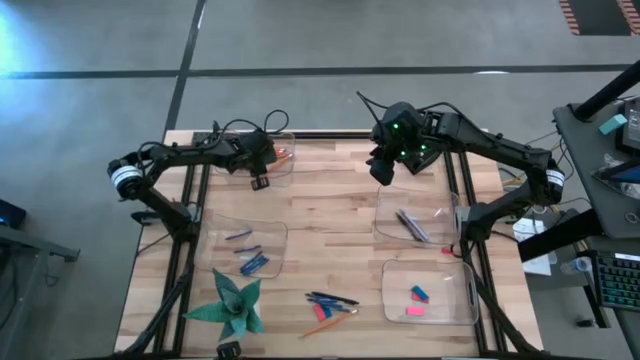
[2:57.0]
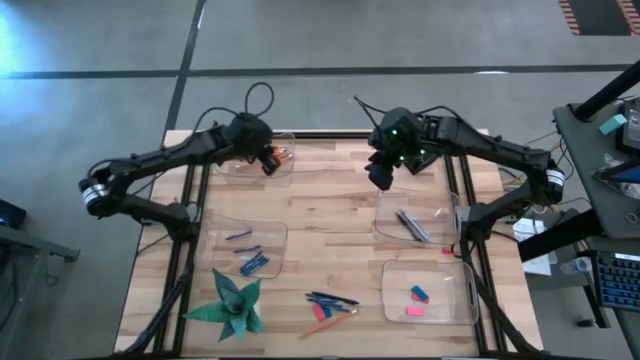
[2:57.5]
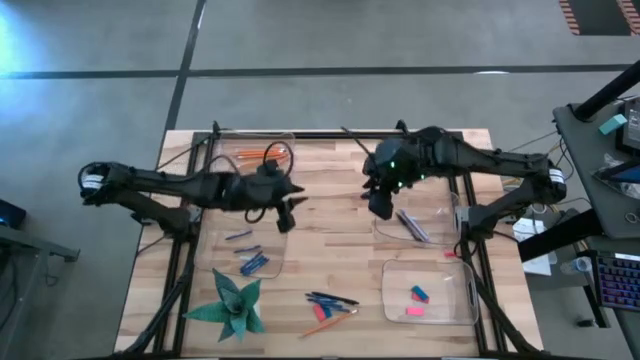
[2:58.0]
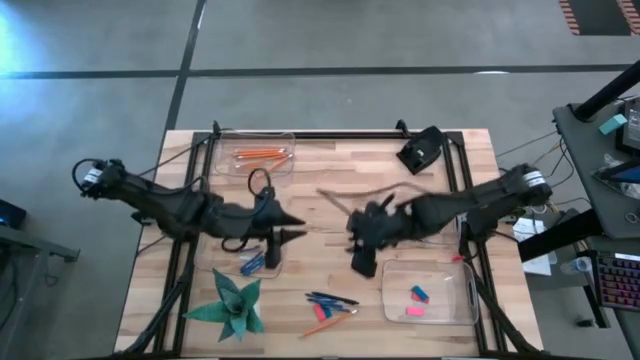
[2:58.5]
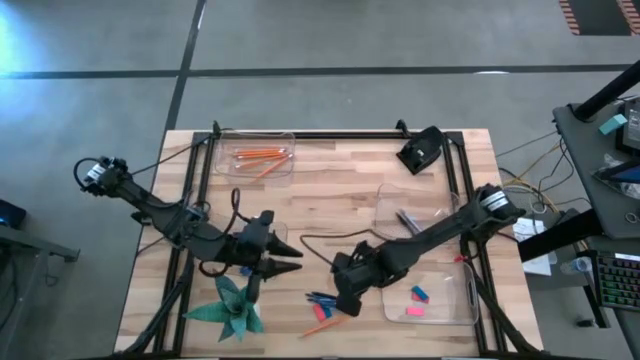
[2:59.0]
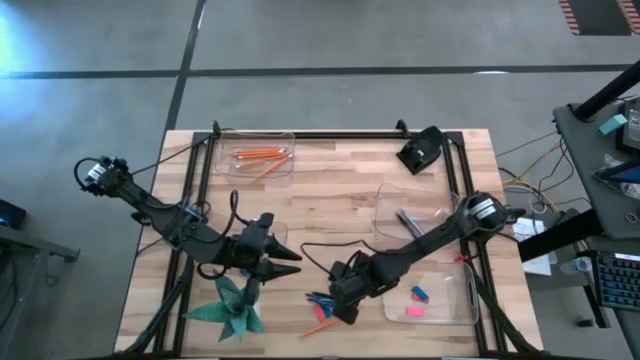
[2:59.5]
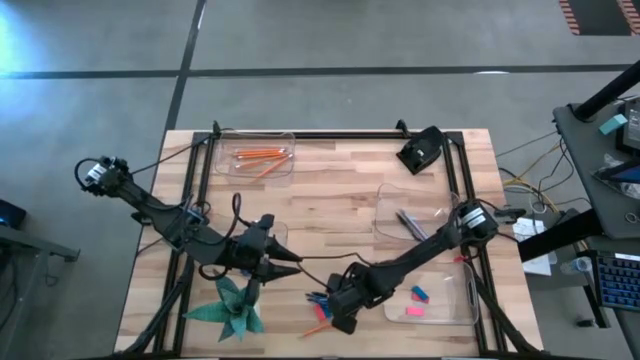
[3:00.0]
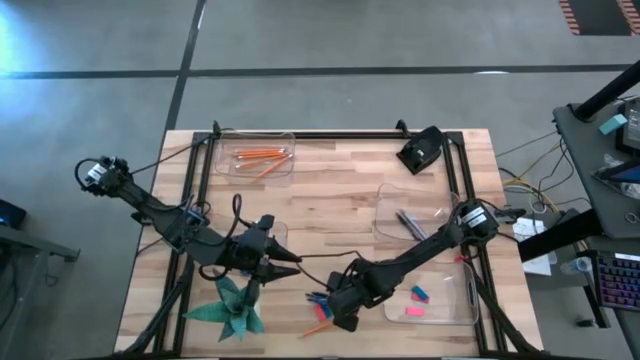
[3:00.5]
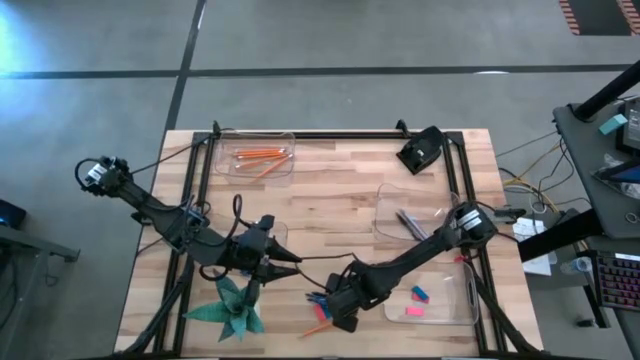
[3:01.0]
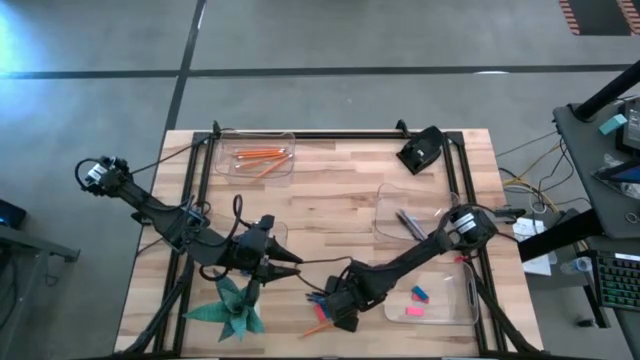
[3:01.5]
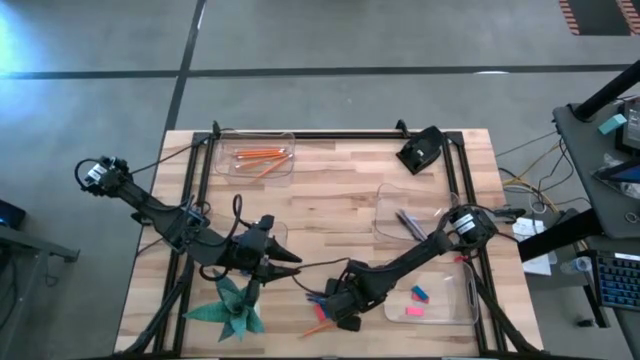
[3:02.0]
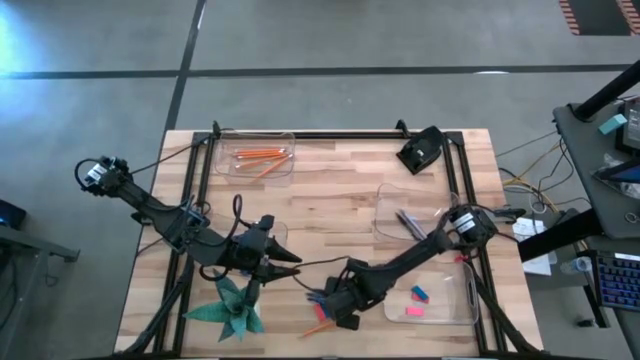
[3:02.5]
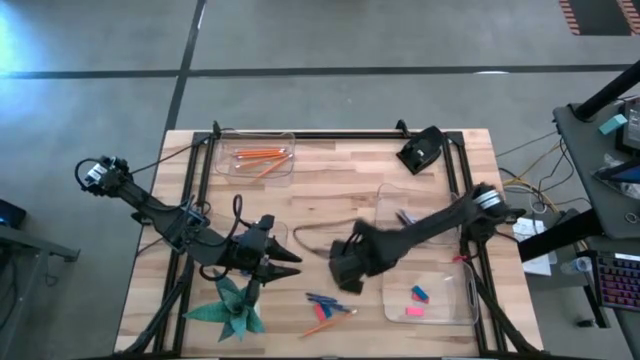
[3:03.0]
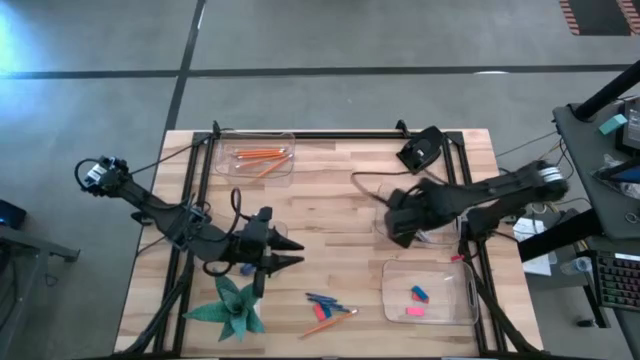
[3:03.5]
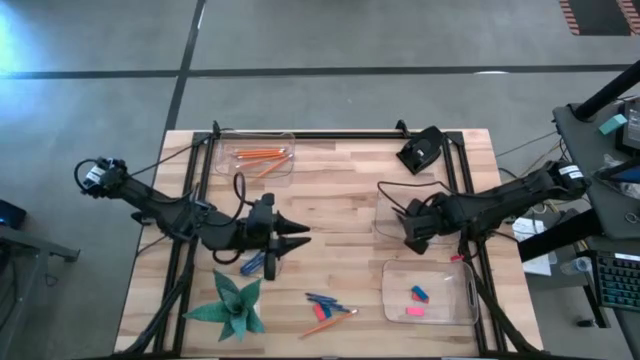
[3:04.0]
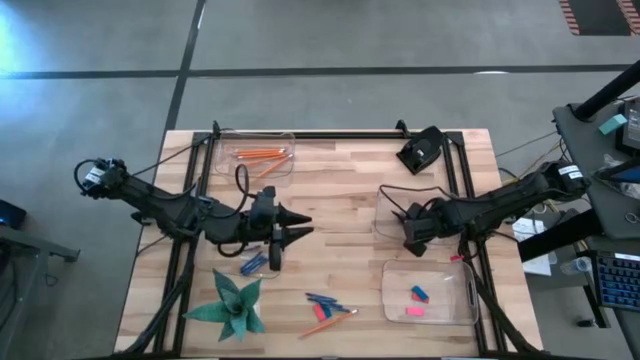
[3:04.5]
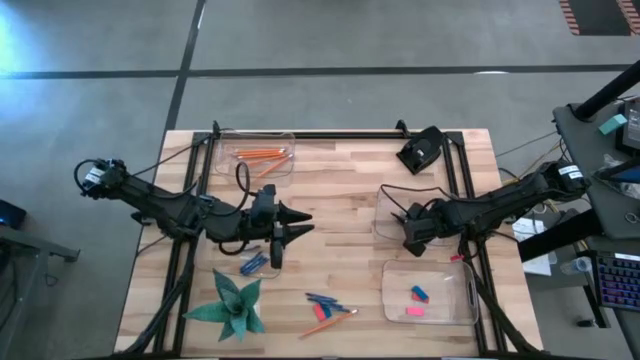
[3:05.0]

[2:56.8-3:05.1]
Task: Sort crayons/erasers/pens/pencils in bins
Put the black pen into the middle right transparent bin

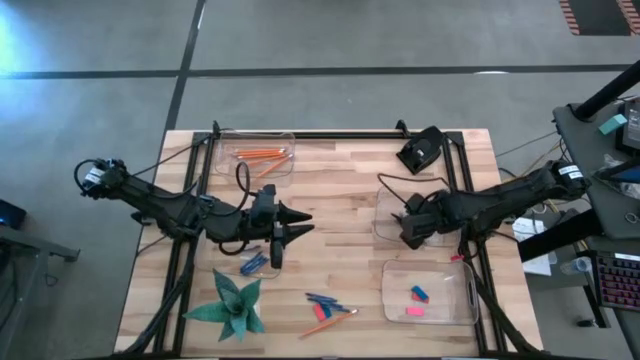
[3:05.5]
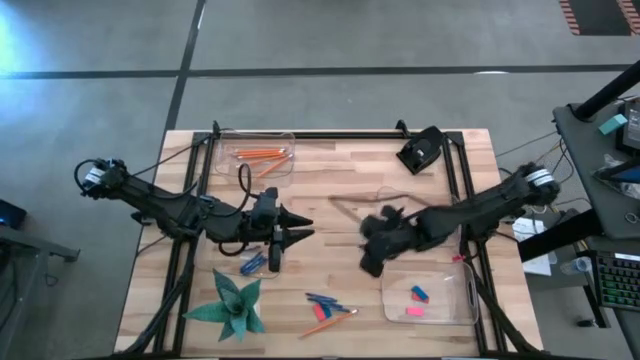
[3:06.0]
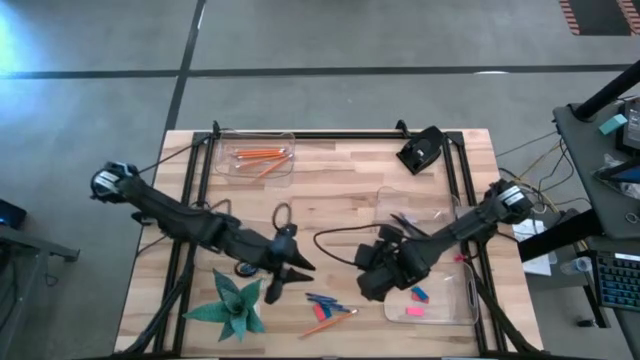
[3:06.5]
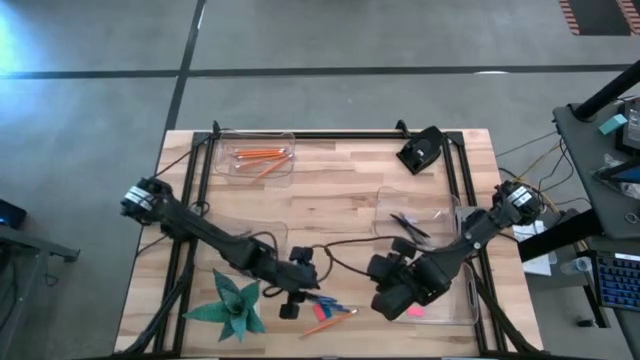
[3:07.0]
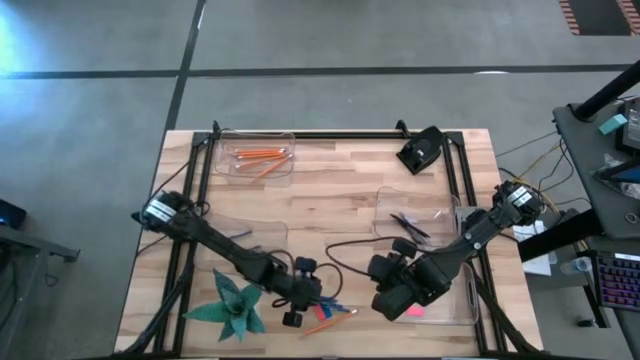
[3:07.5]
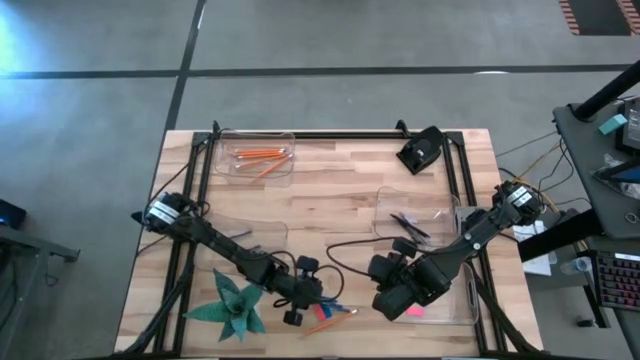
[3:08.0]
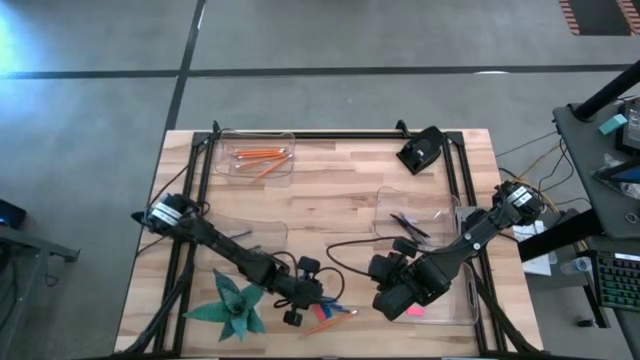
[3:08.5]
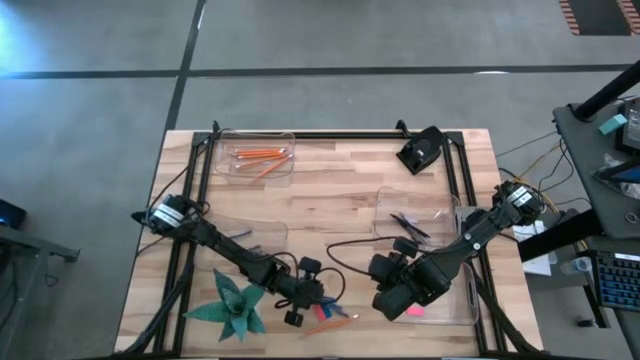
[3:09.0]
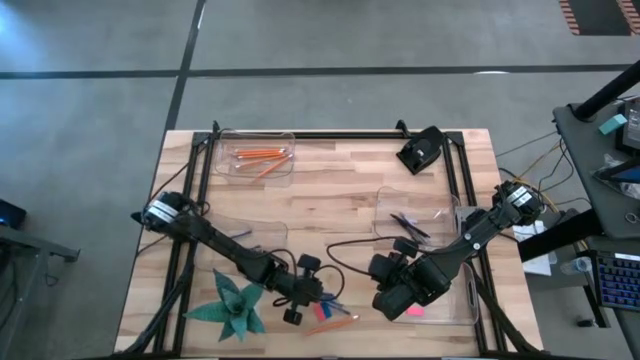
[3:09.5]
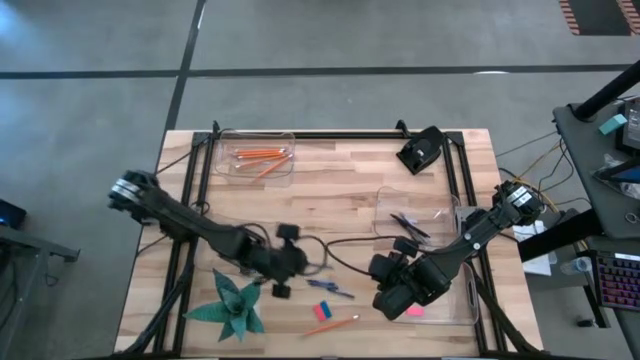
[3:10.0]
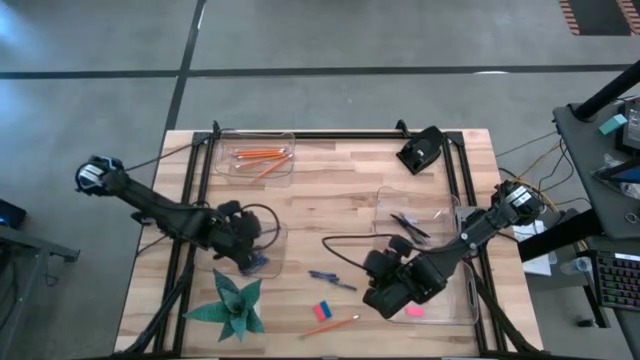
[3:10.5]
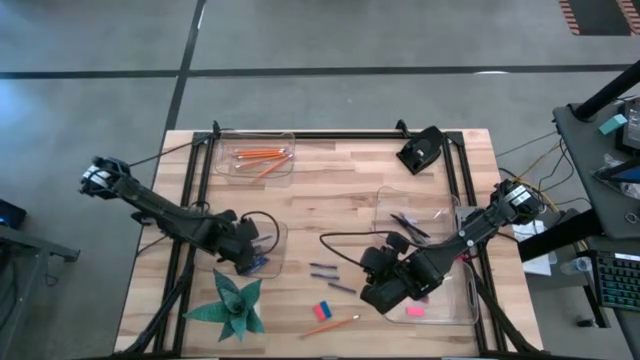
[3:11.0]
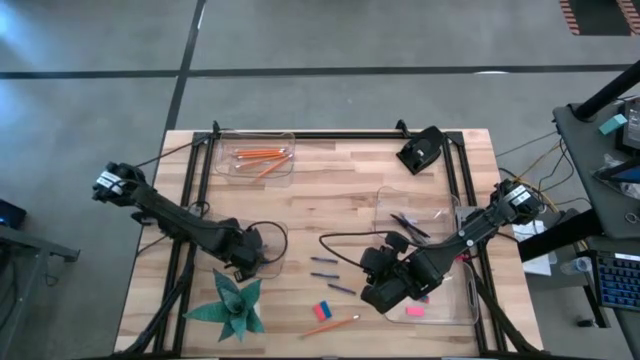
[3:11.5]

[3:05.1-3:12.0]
Put the blue crayon into the middle left transparent bin

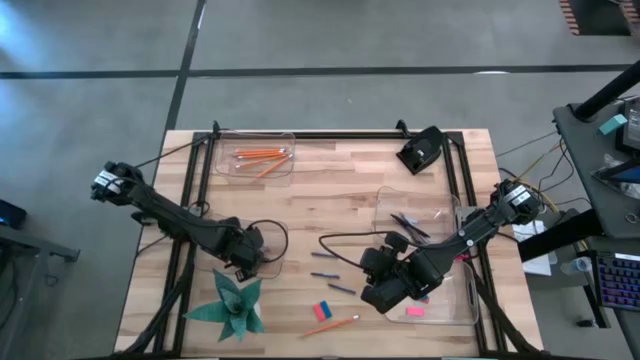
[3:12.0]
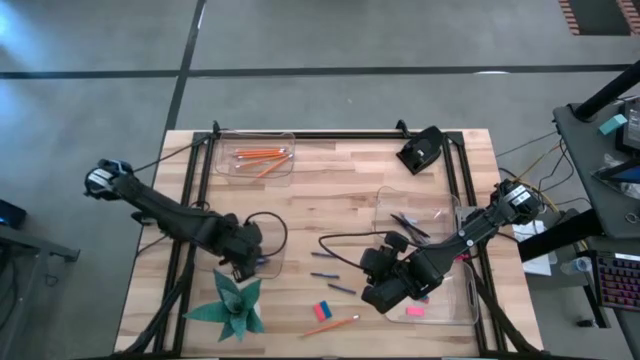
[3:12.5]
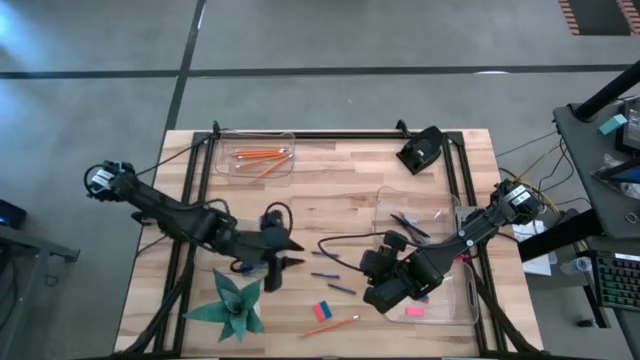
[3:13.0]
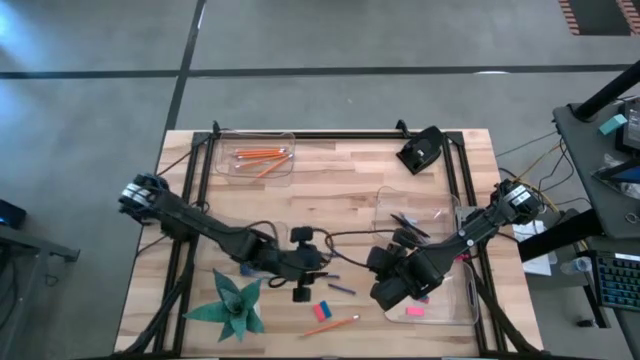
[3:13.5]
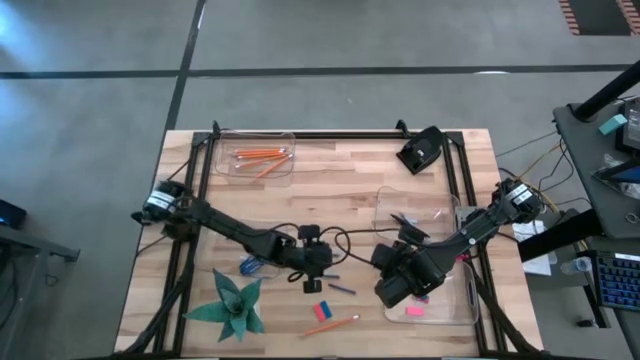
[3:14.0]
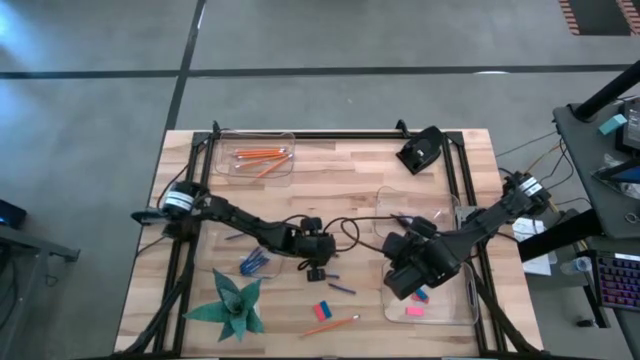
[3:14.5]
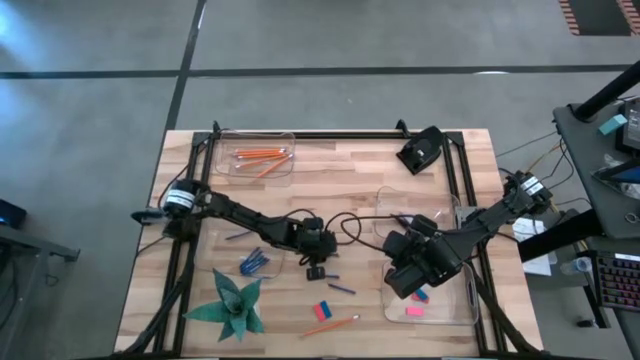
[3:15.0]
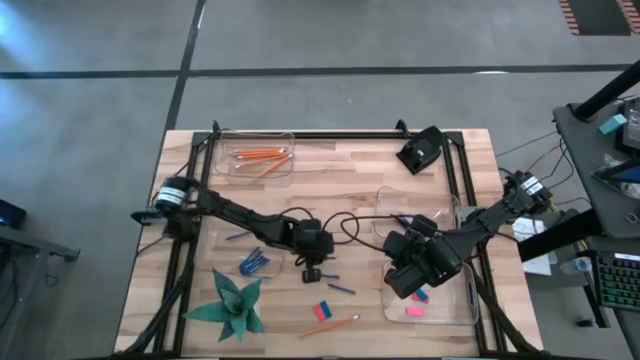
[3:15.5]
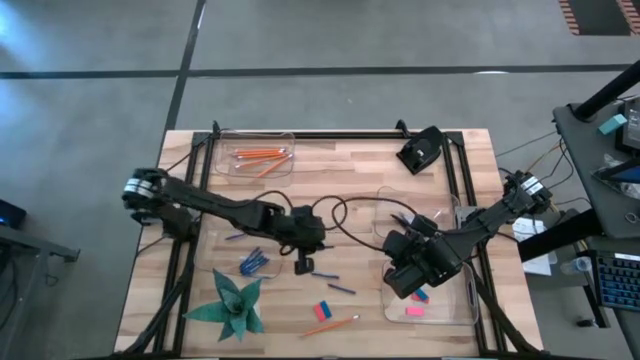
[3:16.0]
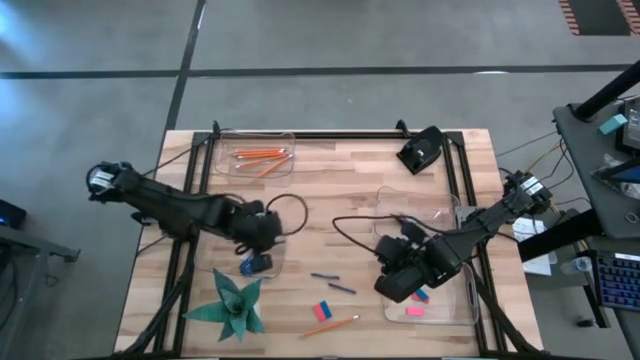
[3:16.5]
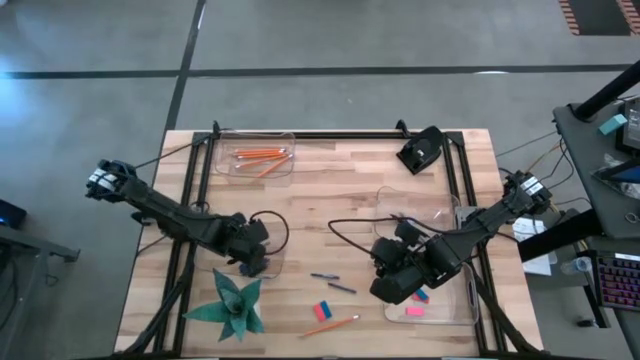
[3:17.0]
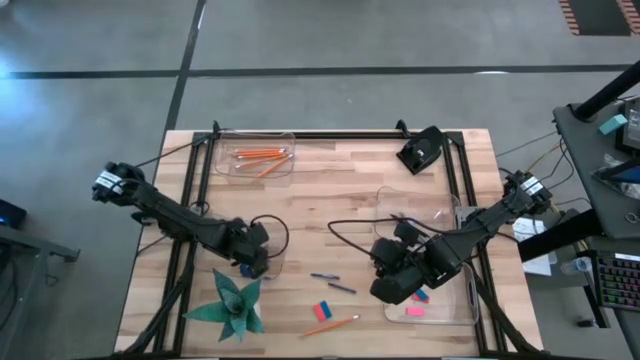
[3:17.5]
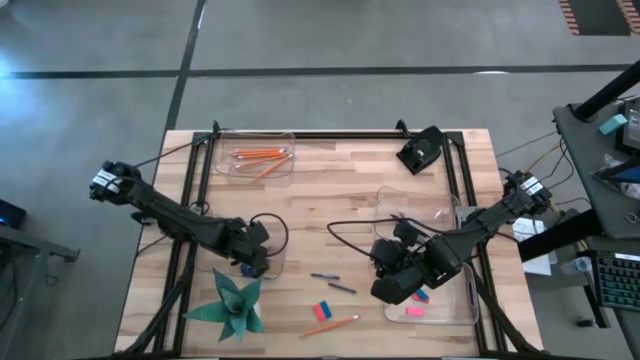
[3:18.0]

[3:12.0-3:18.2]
Put the blue crayon into the middle left transparent bin
